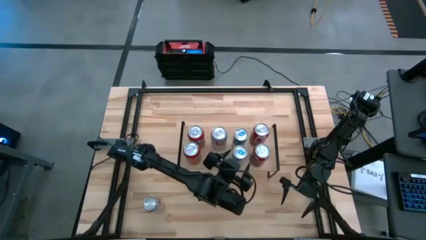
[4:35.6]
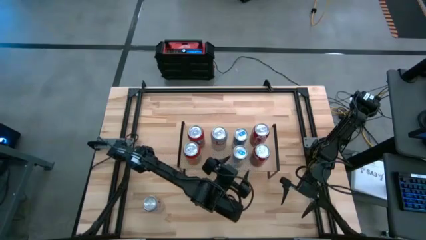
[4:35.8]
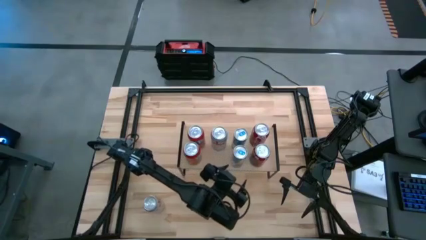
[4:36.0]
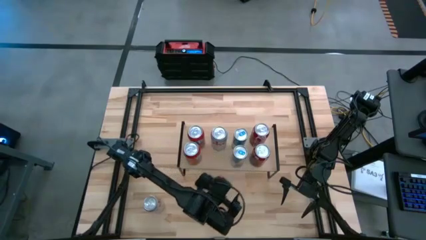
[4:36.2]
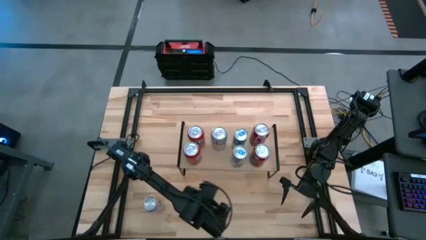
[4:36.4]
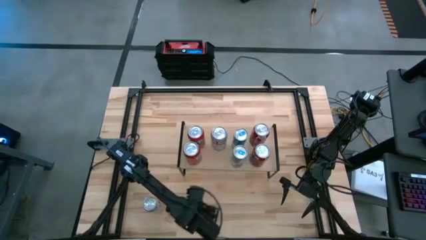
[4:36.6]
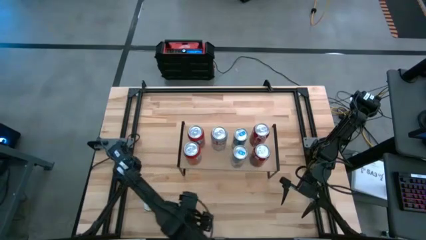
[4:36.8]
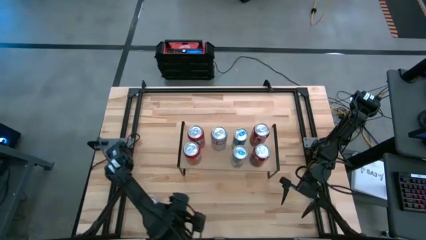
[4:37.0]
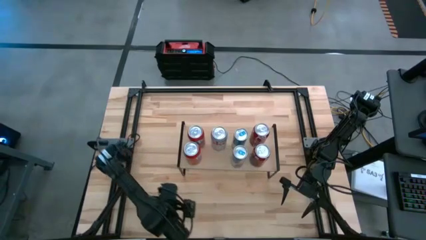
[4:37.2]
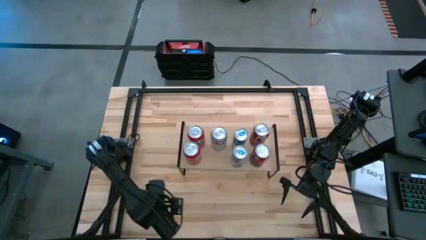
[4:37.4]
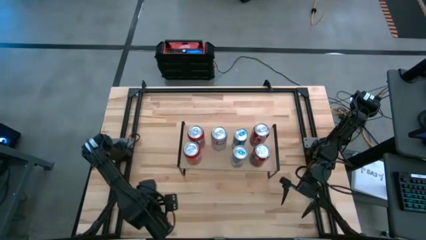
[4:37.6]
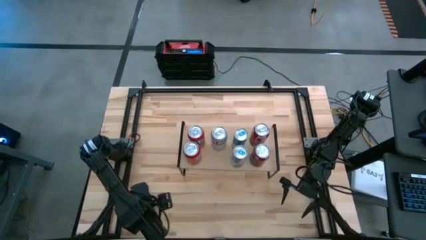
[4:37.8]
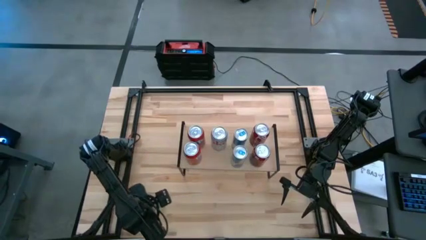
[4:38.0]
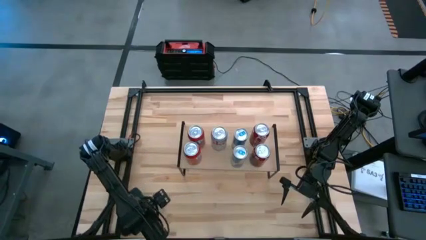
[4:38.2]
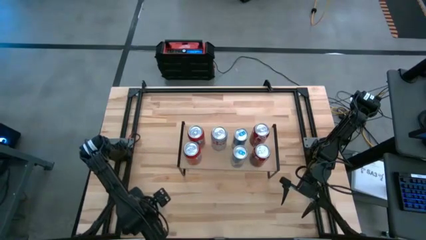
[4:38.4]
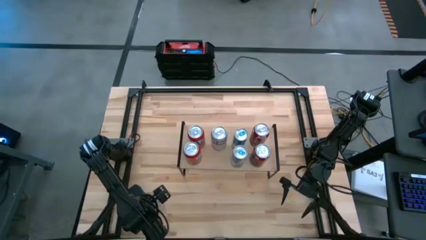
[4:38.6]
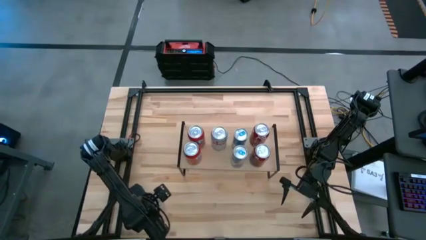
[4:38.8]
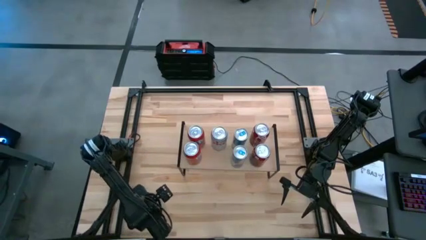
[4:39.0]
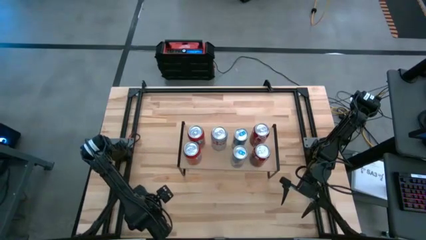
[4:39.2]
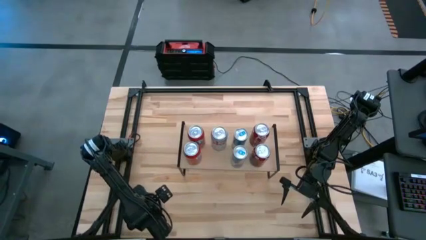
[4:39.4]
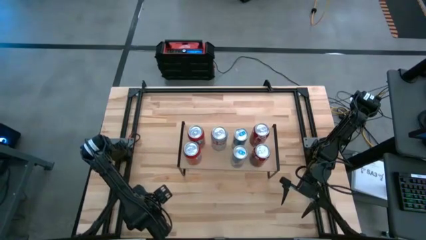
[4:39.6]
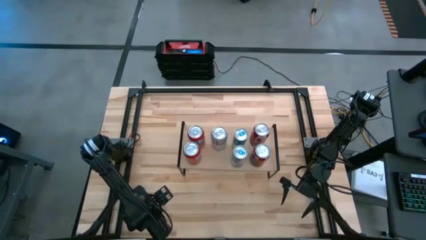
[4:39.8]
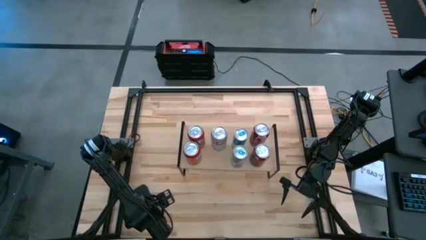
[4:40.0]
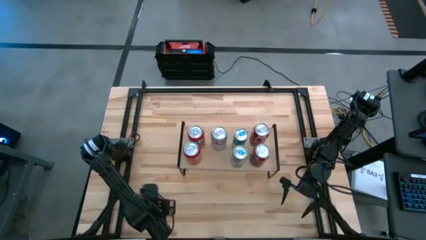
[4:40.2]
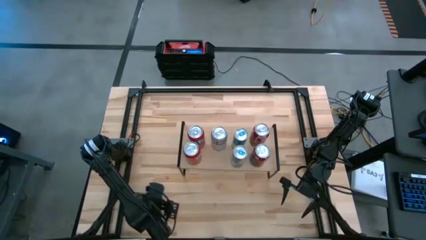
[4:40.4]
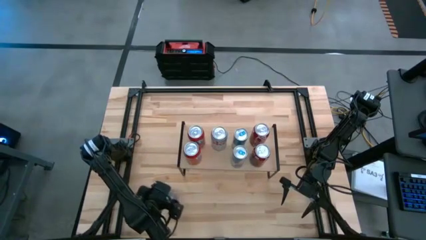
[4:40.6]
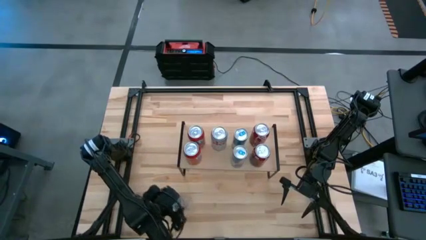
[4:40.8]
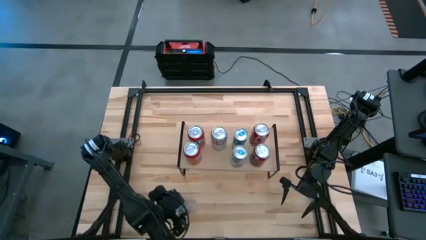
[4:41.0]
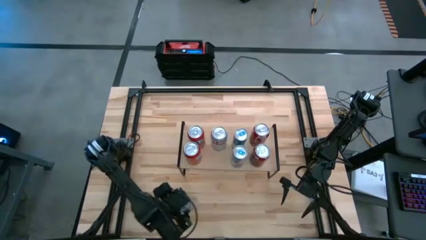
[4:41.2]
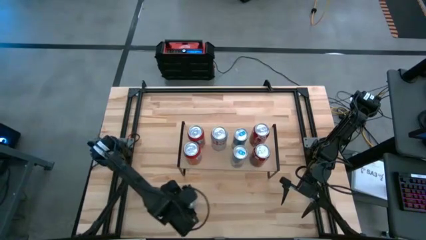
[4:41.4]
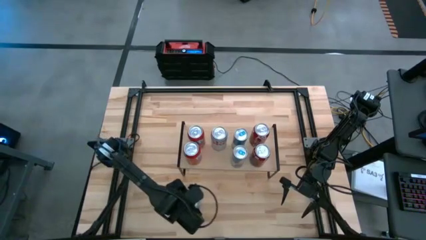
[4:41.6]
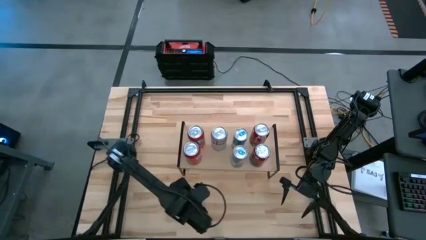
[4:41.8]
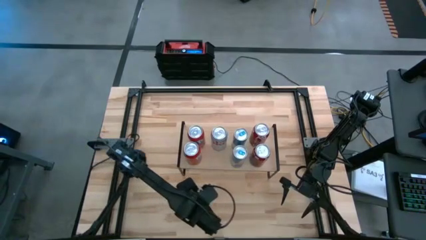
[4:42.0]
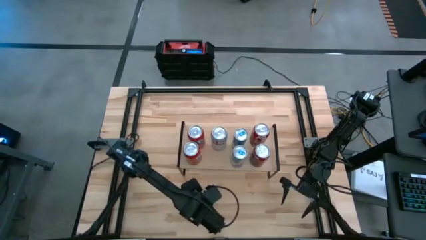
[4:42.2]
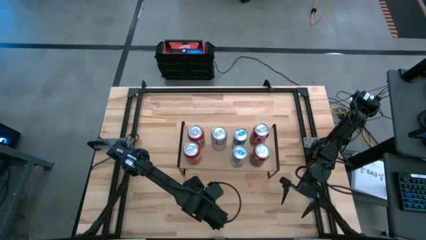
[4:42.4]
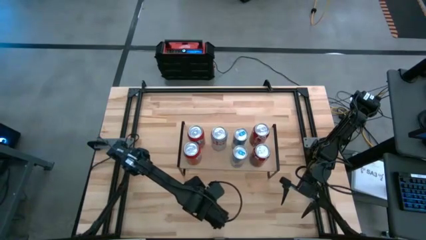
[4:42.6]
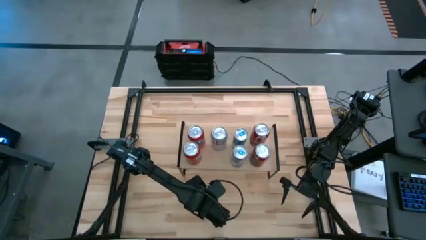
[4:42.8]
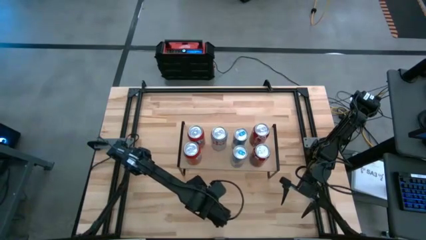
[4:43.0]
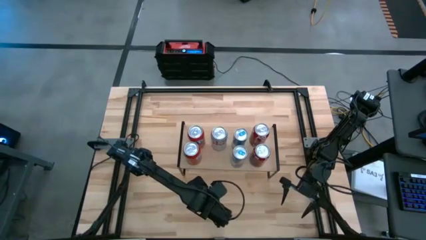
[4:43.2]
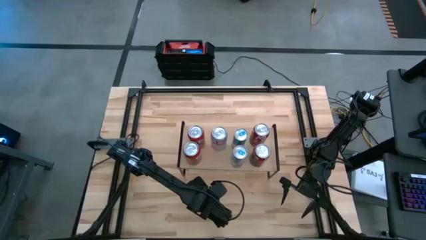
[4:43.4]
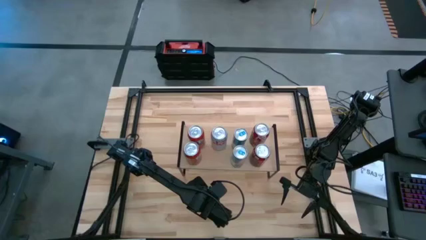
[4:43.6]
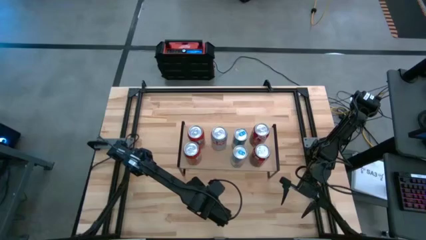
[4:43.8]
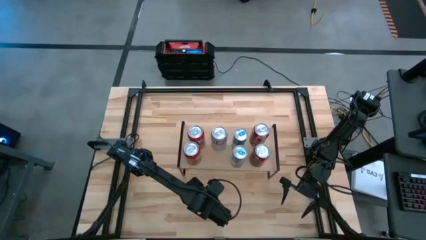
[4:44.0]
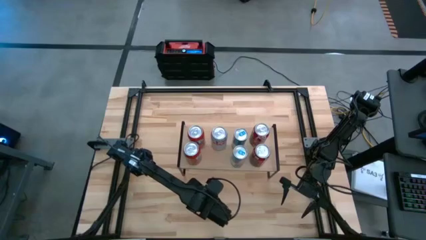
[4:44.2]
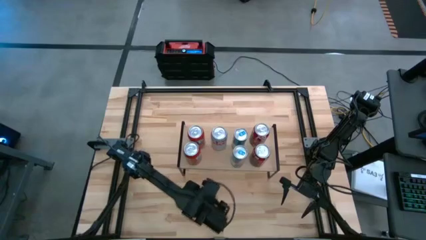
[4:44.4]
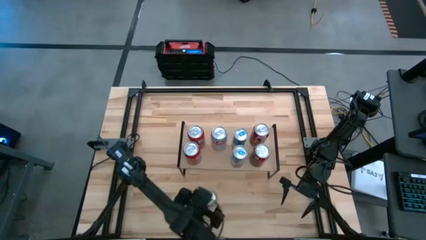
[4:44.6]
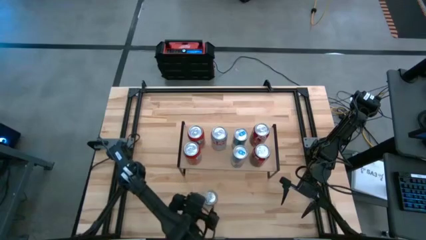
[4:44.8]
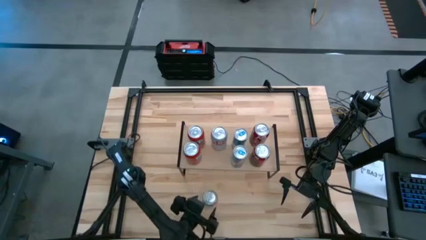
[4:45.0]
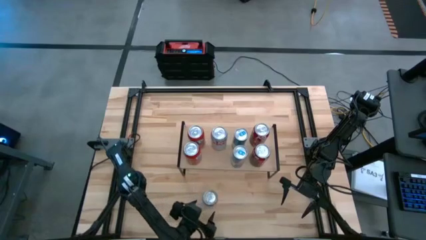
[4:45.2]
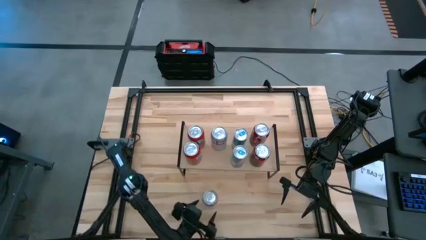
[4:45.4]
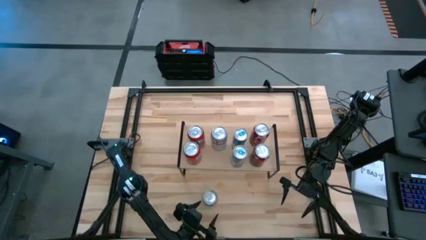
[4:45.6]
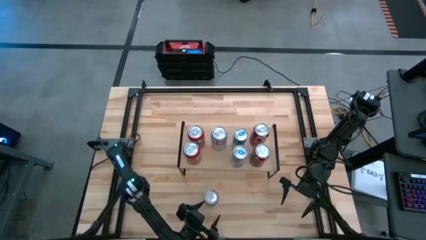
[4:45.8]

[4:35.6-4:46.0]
Task: Place canned beverage on shelf
Put the silver soda can on the shelf

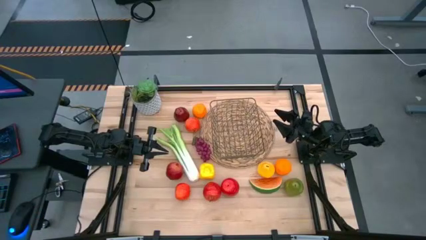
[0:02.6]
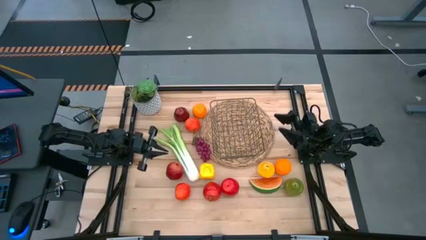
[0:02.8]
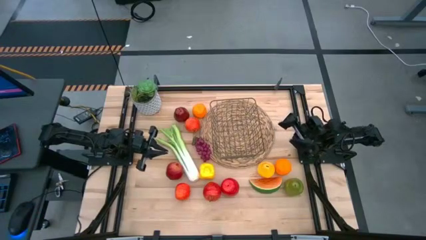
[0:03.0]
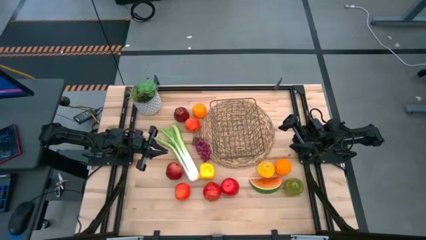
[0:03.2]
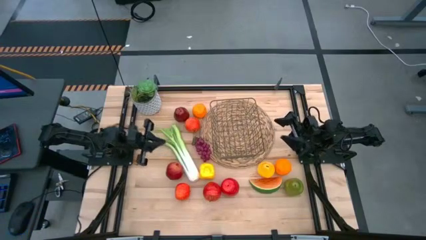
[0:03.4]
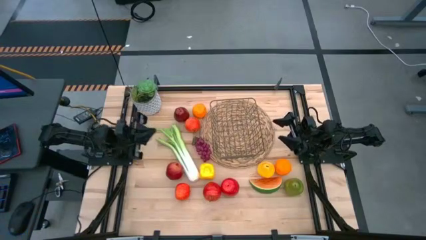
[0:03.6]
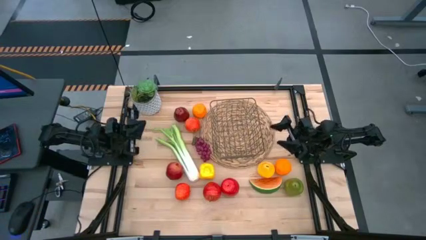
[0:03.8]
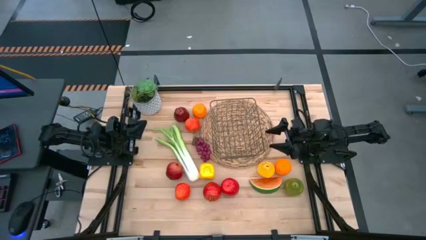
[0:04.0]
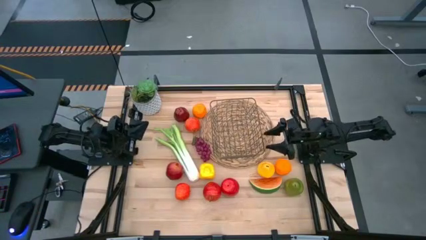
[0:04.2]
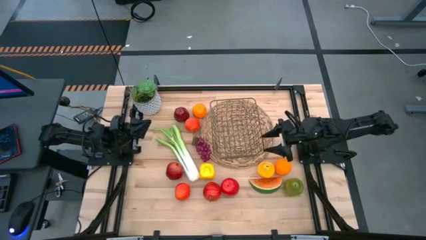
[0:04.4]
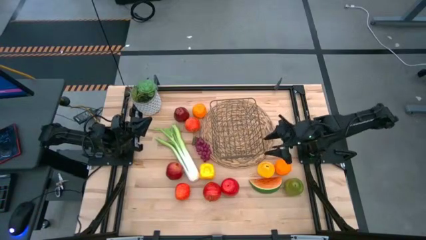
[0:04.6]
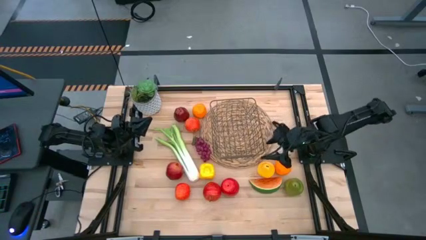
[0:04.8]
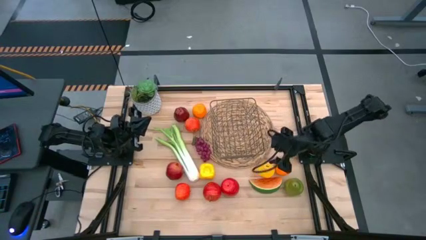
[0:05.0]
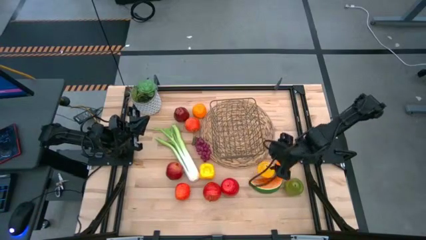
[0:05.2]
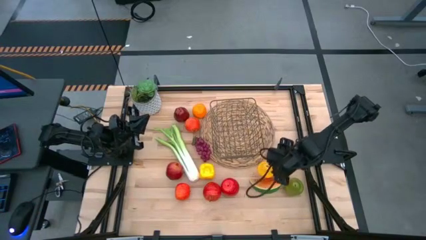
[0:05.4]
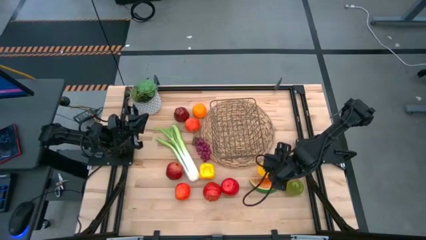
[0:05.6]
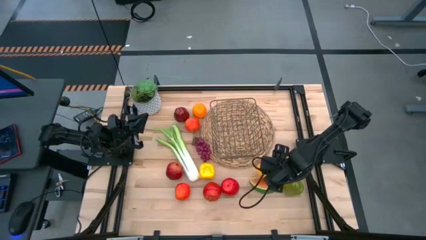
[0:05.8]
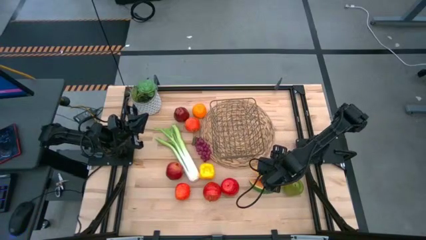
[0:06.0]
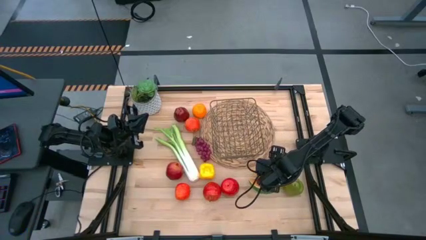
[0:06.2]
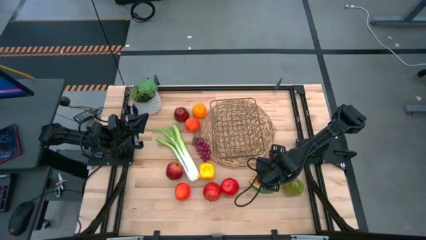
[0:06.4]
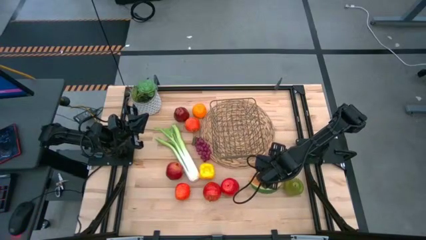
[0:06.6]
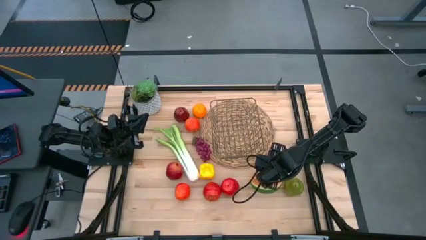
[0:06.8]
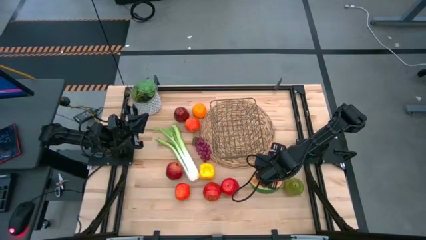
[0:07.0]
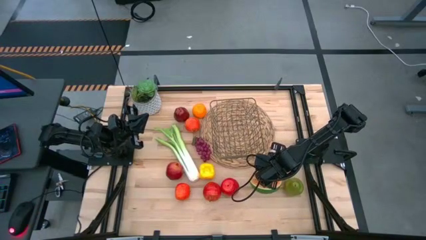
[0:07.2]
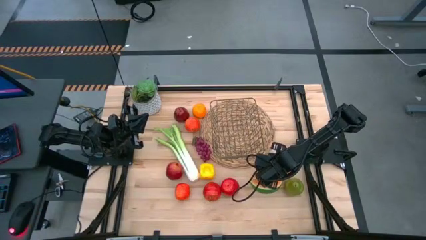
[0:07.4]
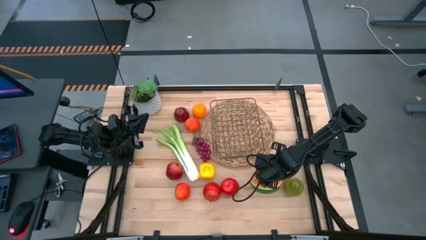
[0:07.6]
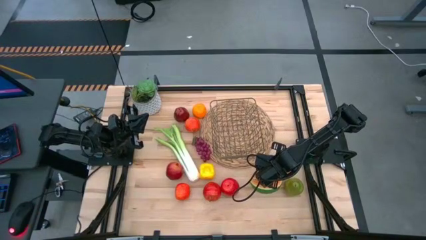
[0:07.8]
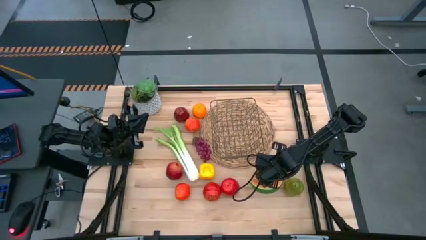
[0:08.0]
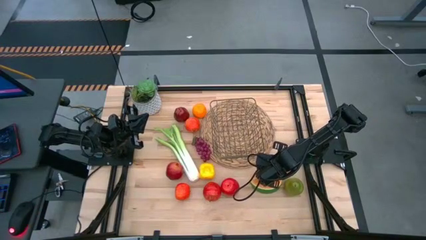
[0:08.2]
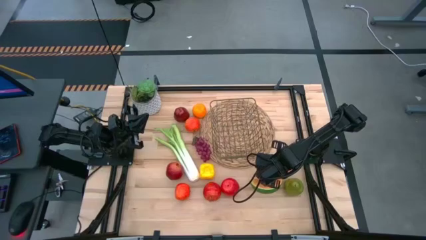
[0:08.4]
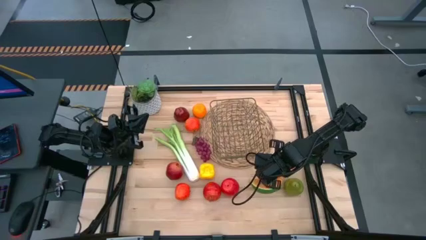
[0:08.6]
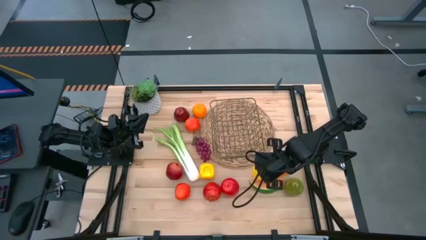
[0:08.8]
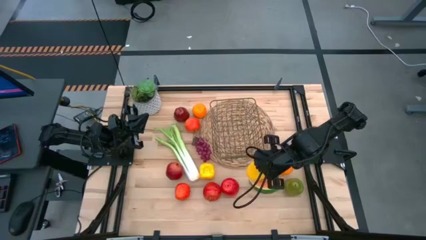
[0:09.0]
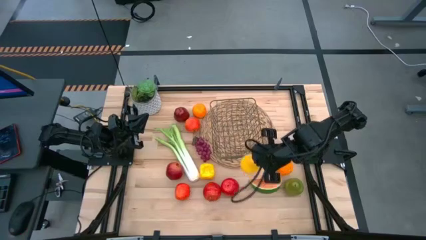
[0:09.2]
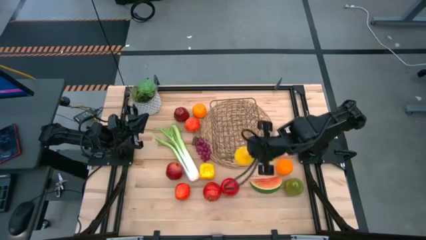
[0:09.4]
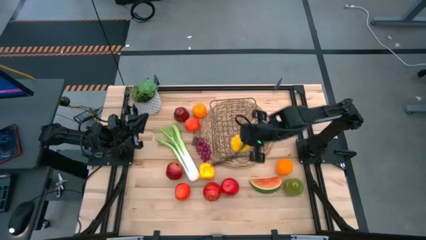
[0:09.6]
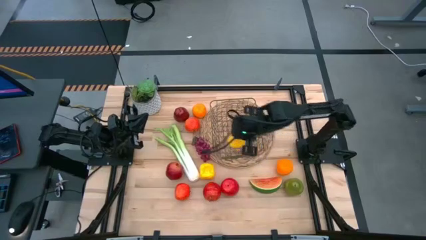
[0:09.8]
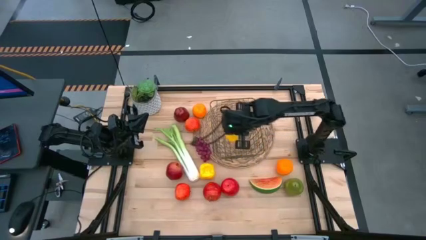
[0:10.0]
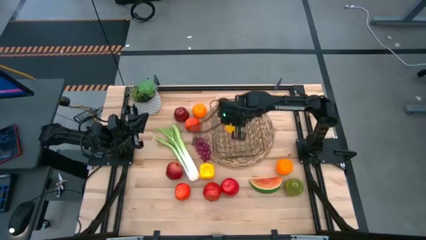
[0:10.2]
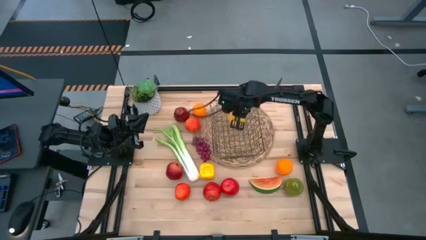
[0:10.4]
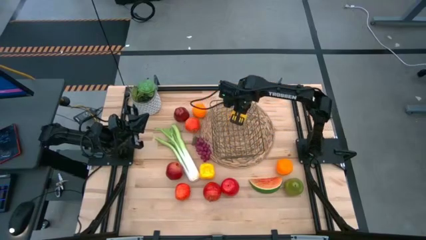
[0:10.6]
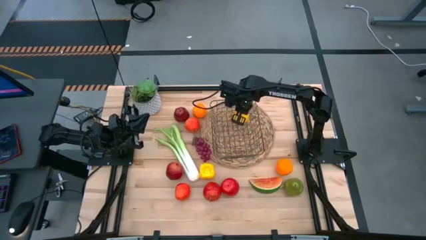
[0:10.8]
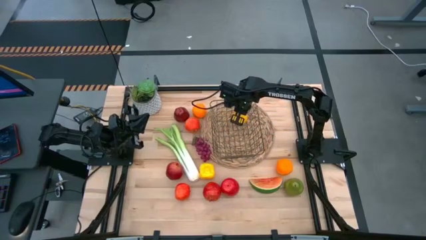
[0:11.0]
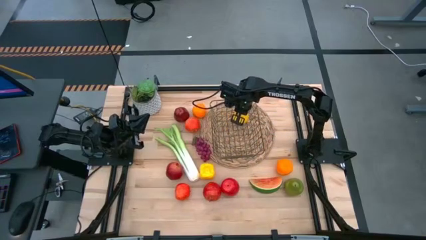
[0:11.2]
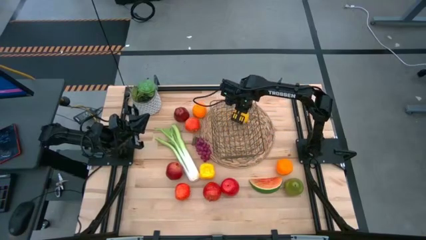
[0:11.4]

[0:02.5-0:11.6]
Task: Build produce basket
Put the yellow pear into the wire basket
